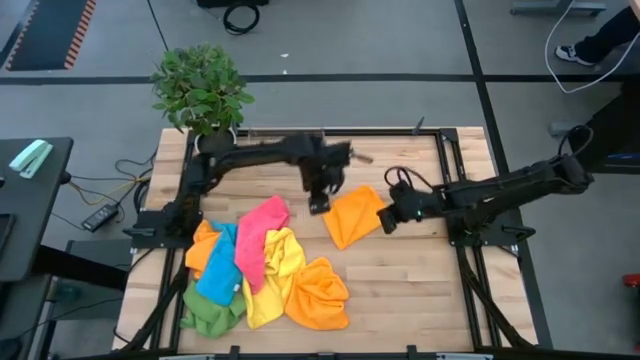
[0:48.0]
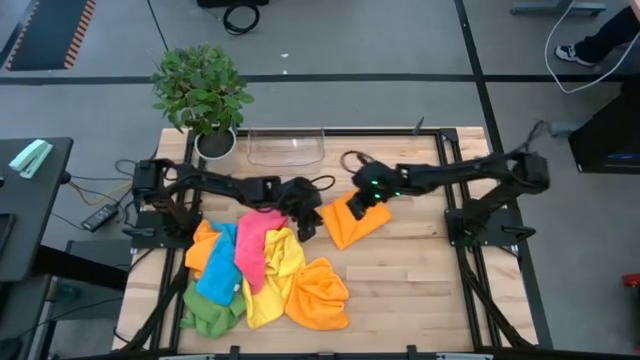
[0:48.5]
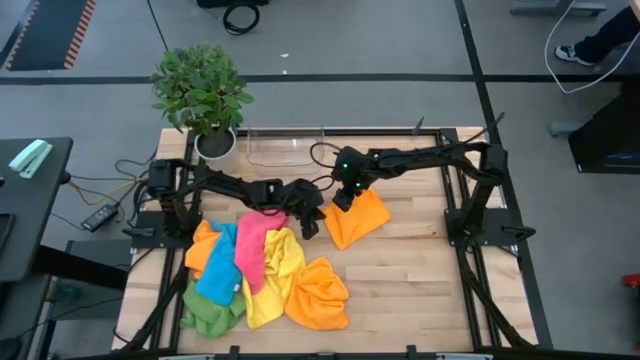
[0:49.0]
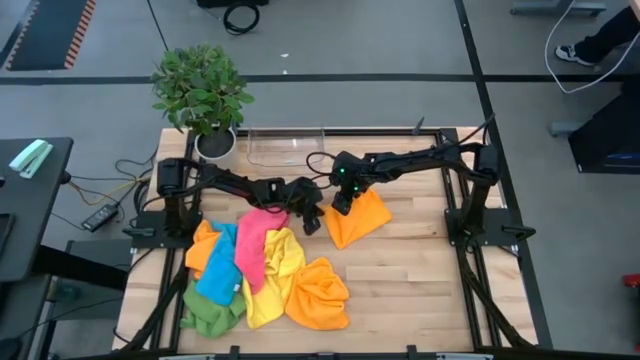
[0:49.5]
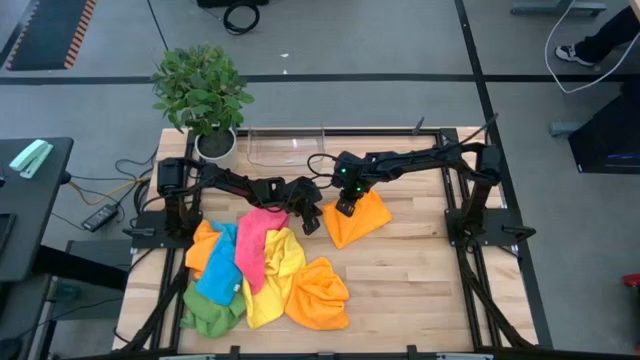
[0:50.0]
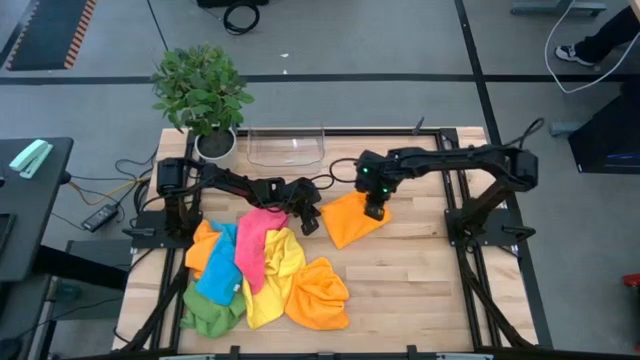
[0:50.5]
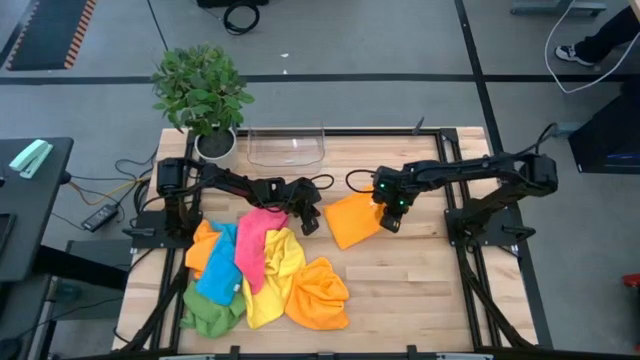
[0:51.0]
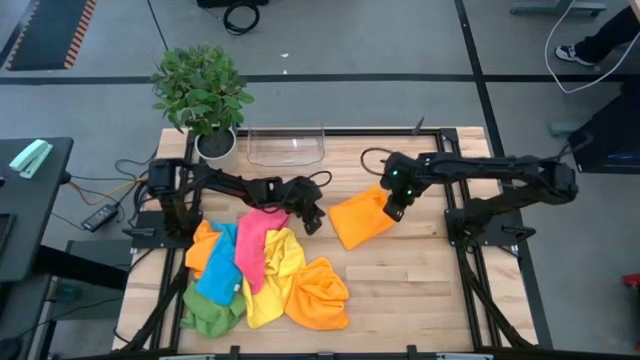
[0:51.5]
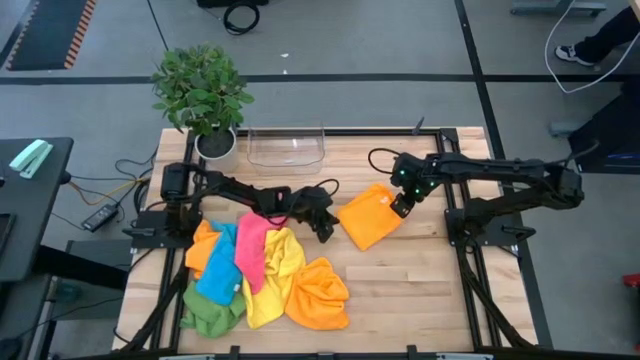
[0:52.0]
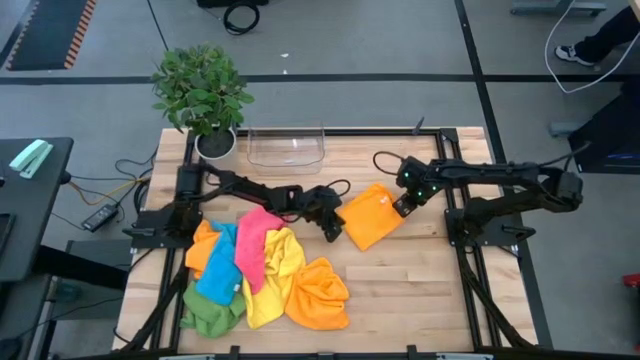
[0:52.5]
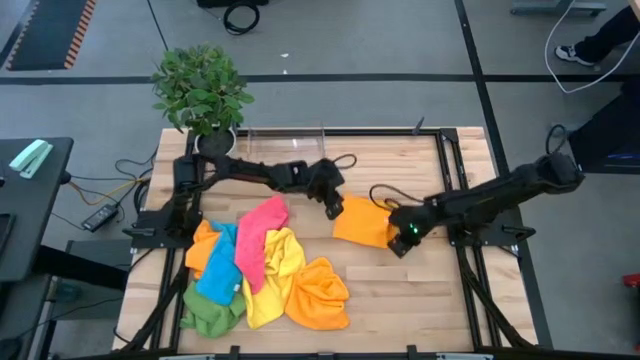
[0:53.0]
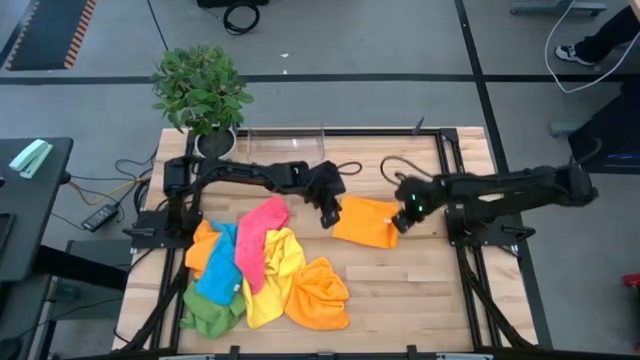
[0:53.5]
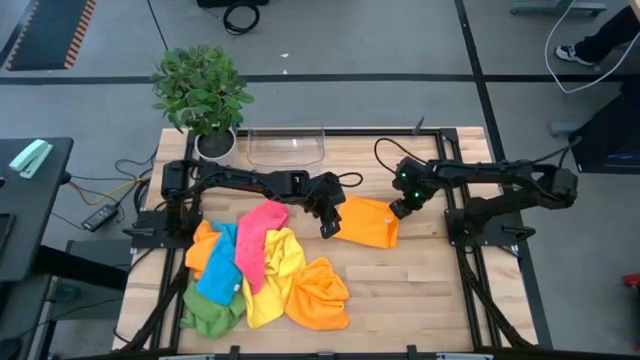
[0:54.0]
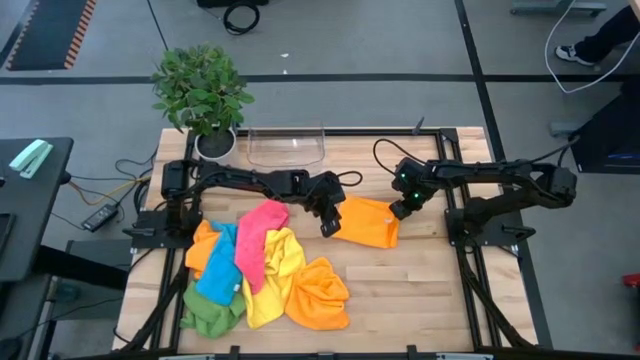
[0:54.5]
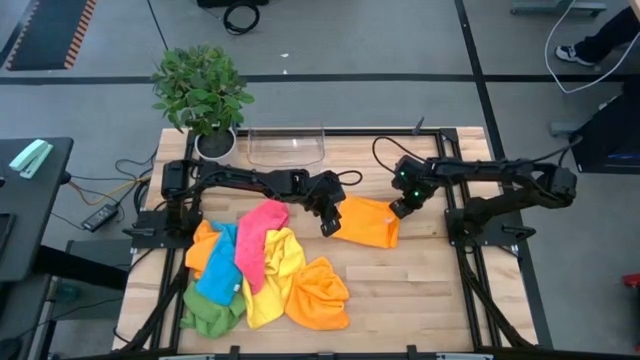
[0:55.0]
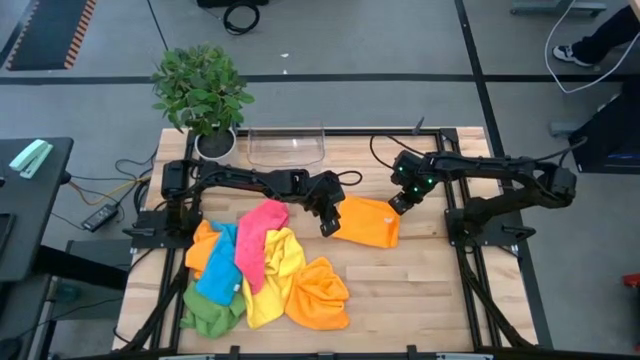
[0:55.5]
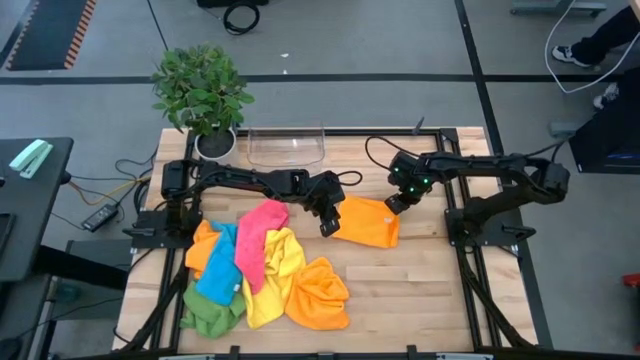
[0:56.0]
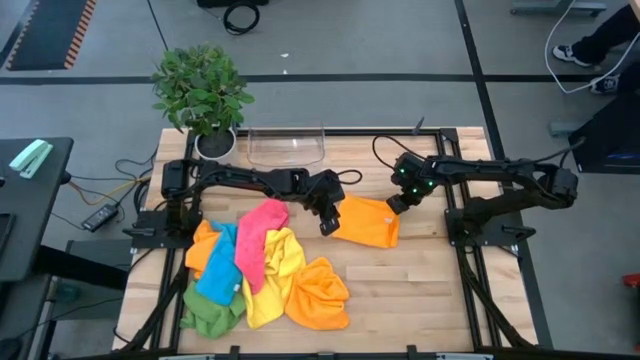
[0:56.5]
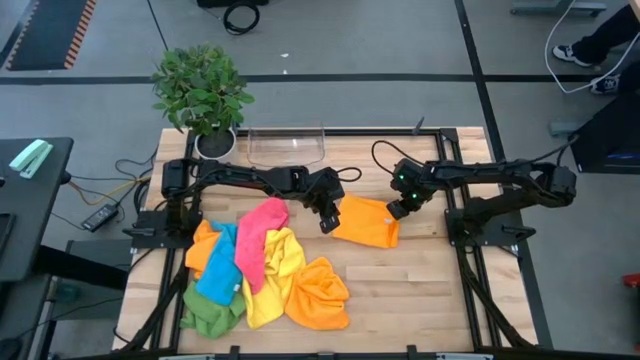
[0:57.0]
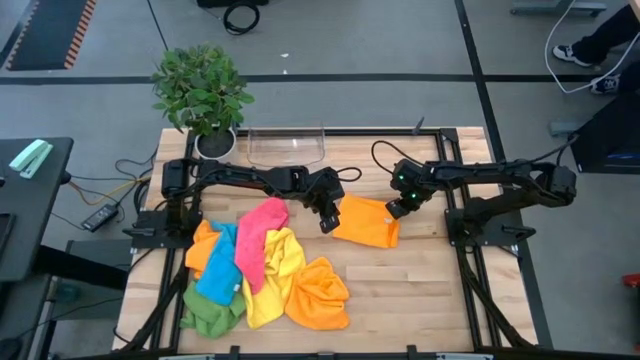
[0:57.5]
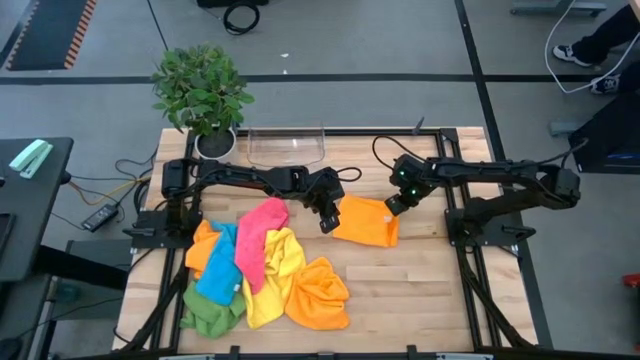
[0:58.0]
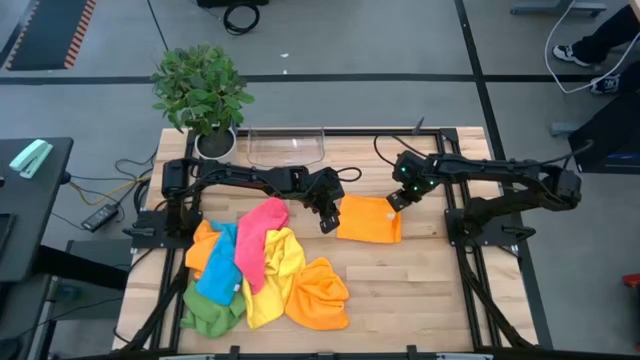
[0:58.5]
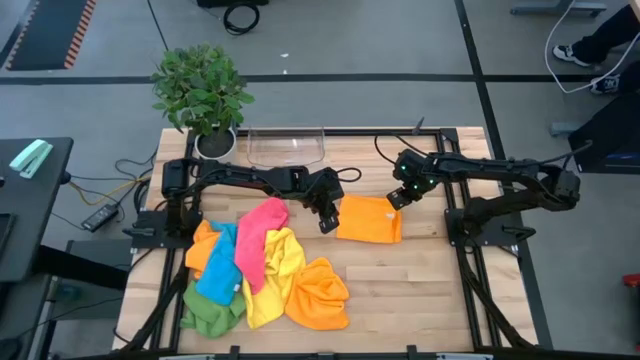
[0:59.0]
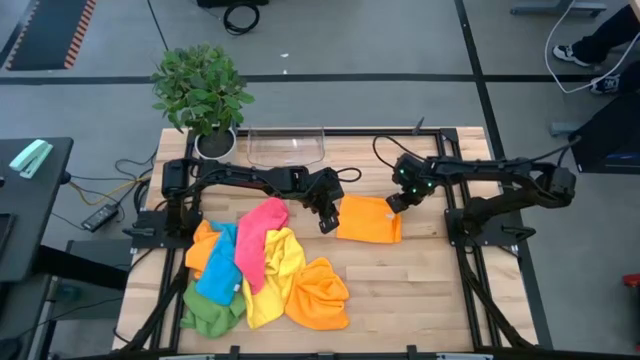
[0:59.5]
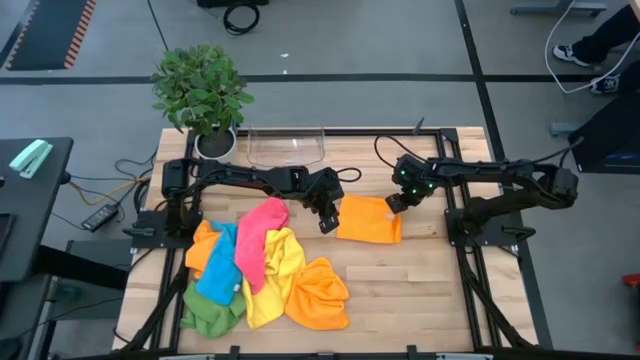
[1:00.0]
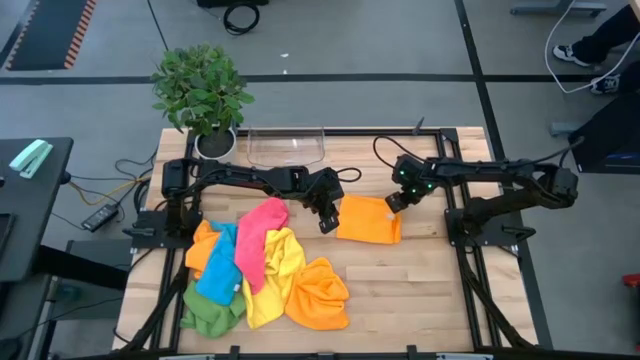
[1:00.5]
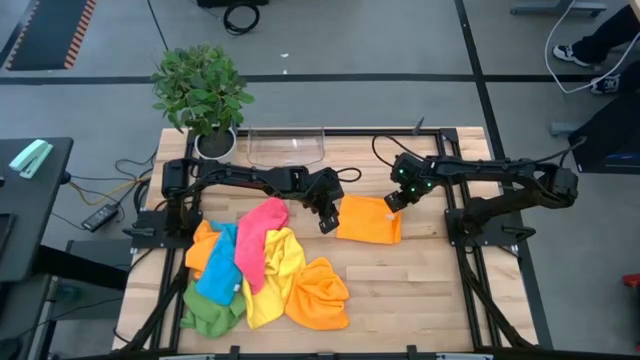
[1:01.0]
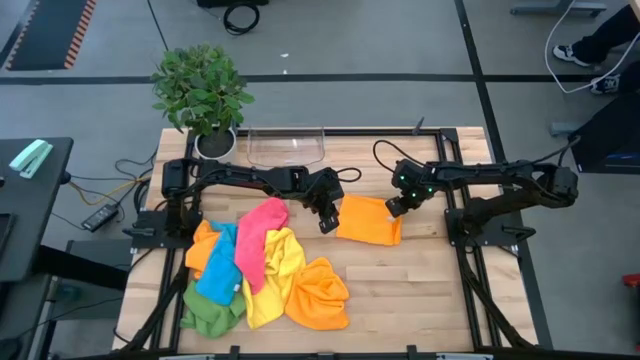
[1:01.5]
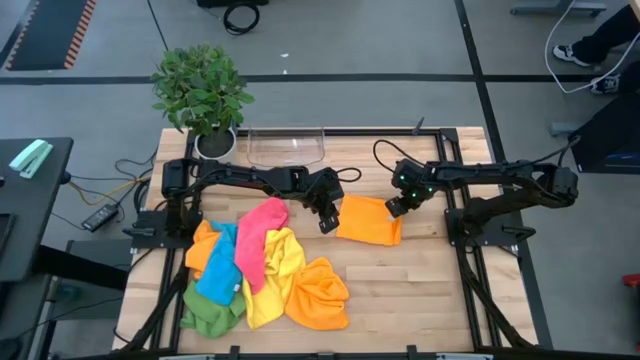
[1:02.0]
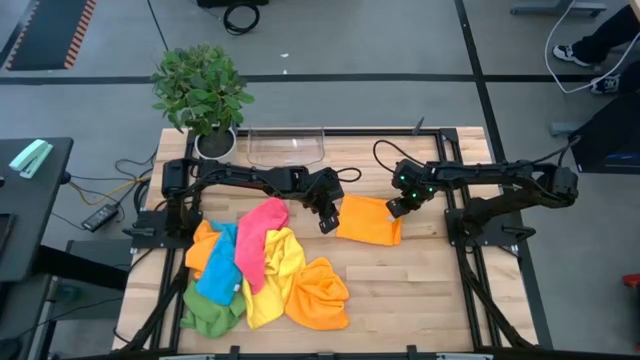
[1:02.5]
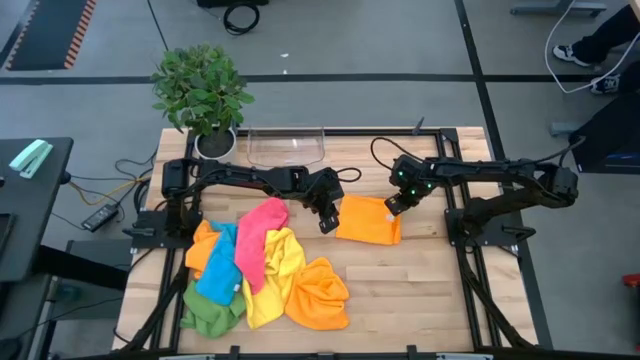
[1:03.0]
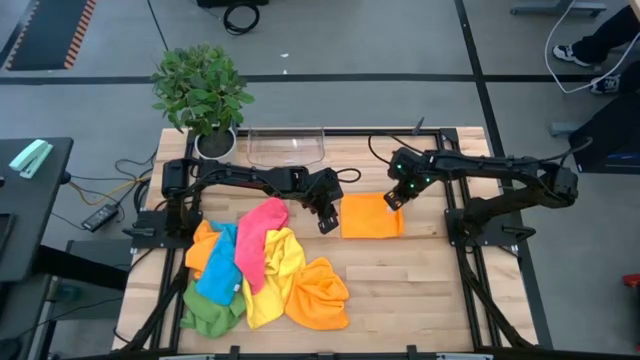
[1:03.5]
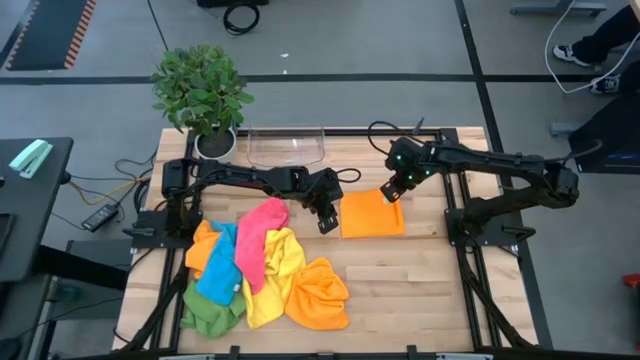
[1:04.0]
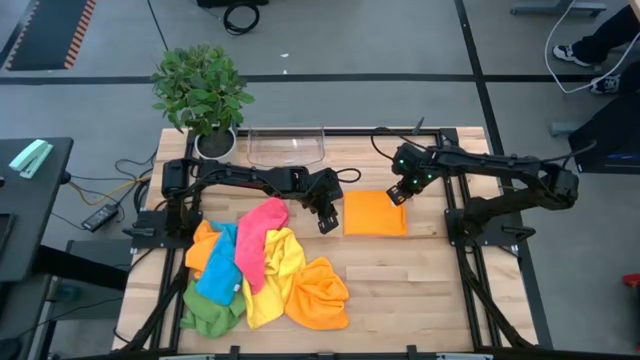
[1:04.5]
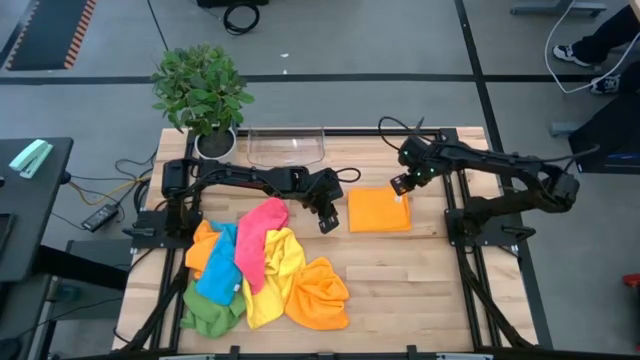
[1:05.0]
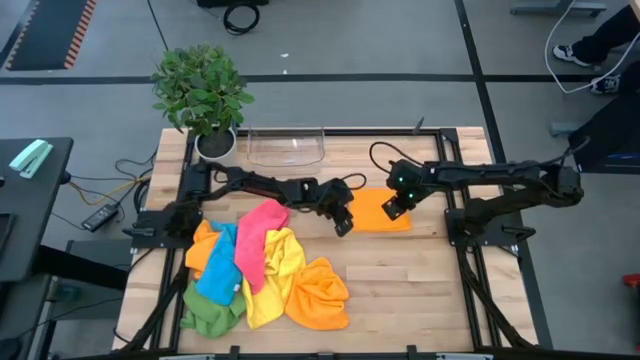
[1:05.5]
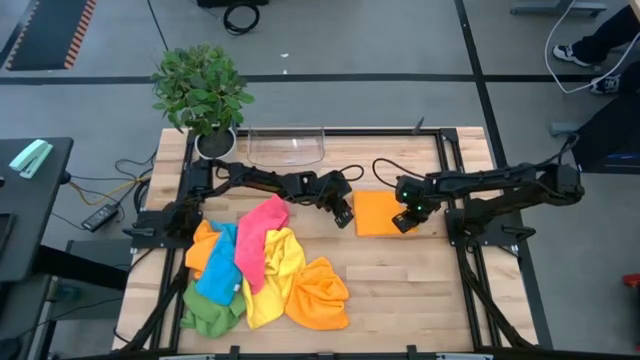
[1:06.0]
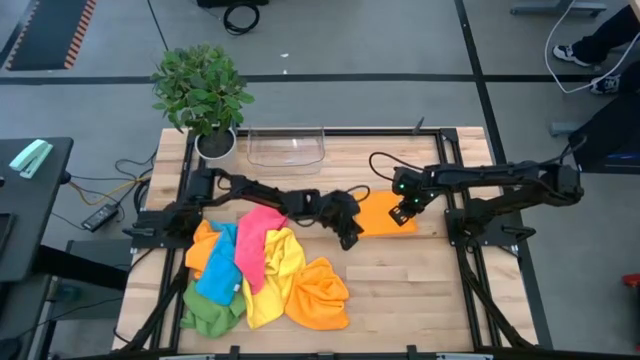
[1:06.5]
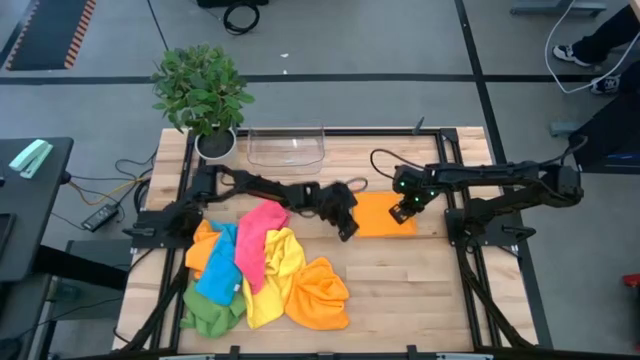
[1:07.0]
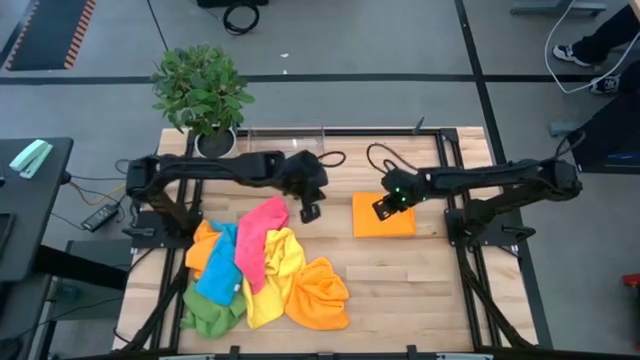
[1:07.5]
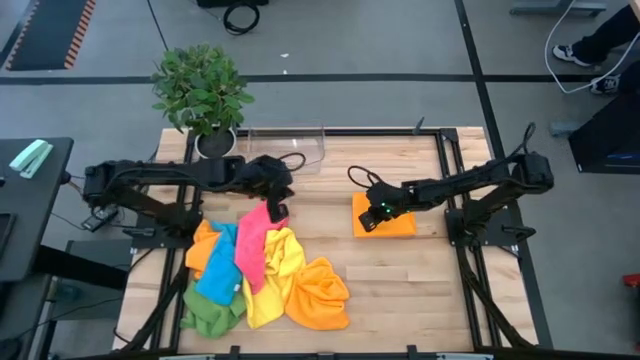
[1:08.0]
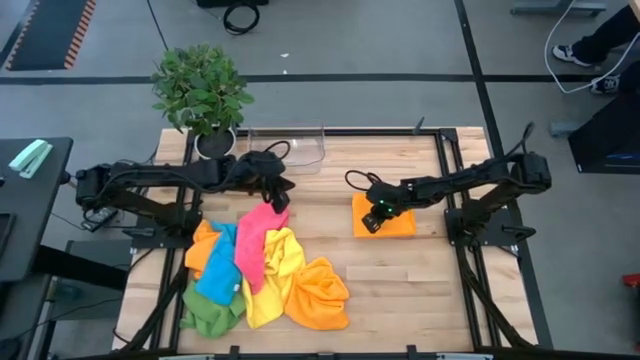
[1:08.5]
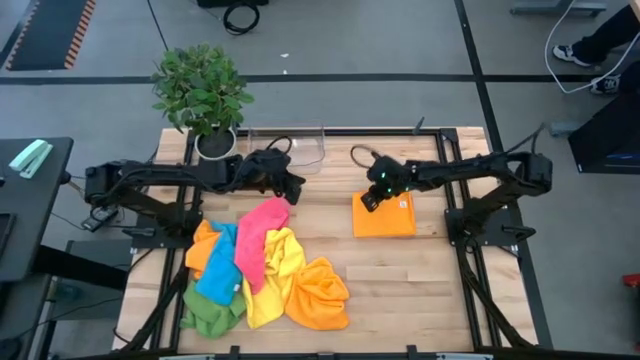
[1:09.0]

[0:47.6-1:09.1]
Task: Fold microfiber towels
Fold the top right orange microfiber cloth
